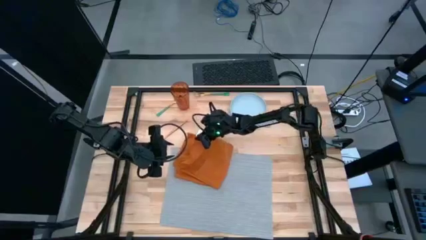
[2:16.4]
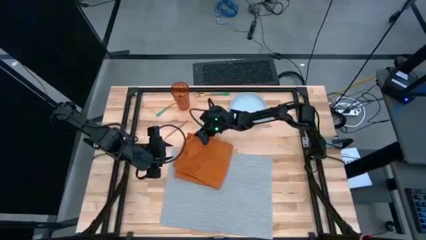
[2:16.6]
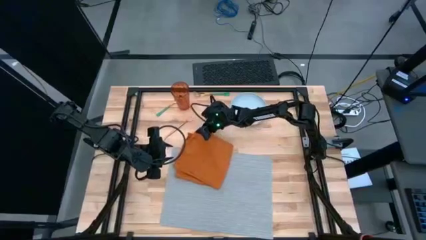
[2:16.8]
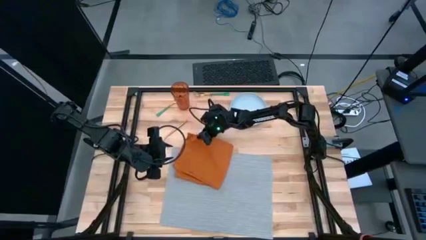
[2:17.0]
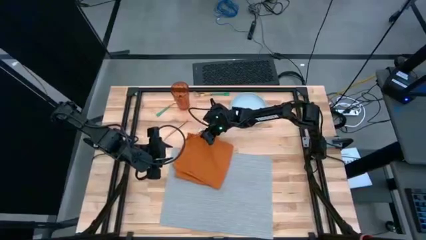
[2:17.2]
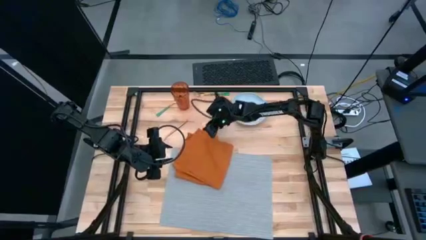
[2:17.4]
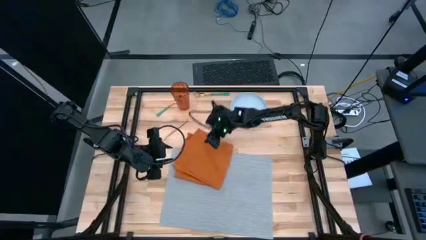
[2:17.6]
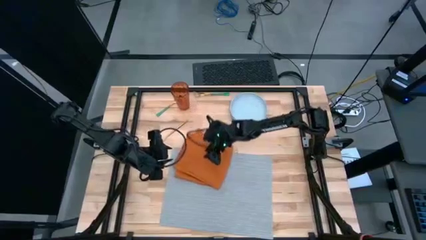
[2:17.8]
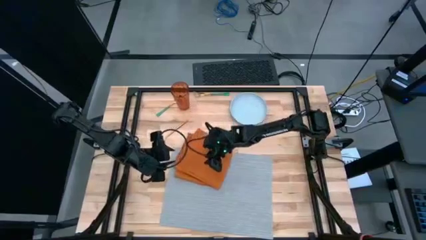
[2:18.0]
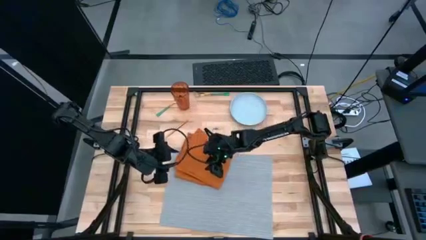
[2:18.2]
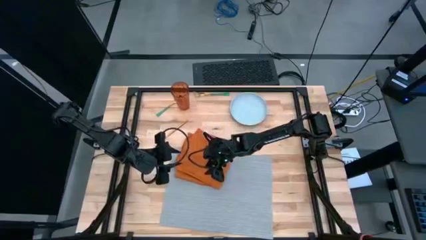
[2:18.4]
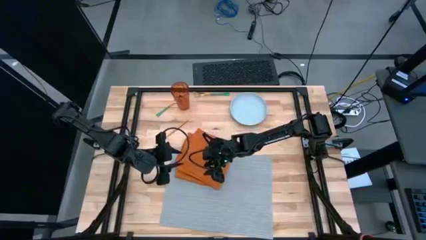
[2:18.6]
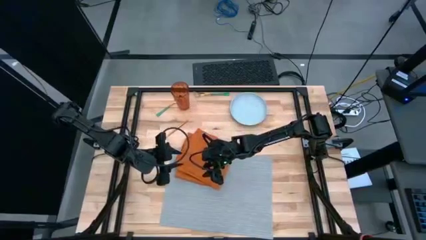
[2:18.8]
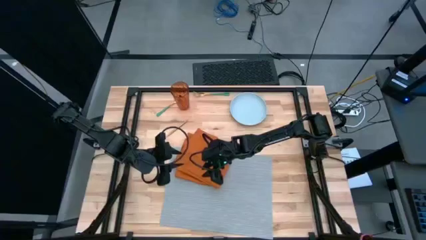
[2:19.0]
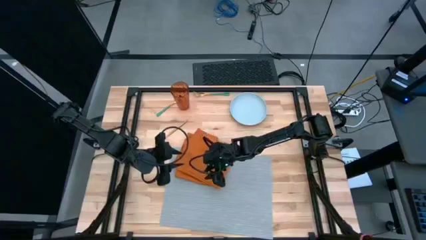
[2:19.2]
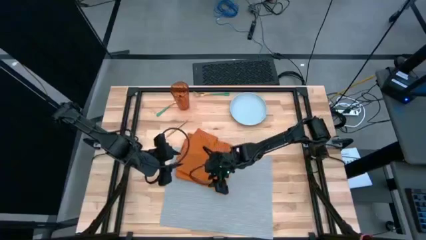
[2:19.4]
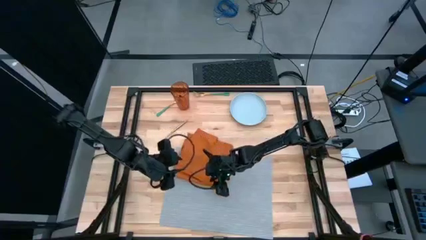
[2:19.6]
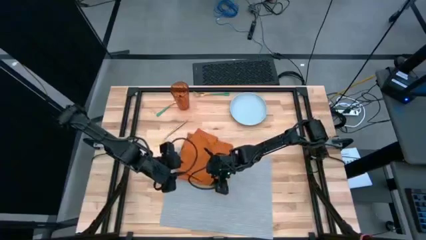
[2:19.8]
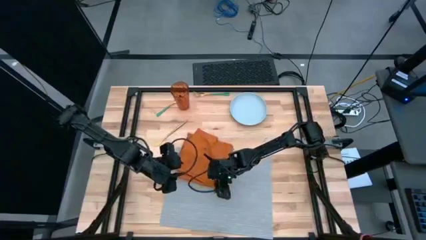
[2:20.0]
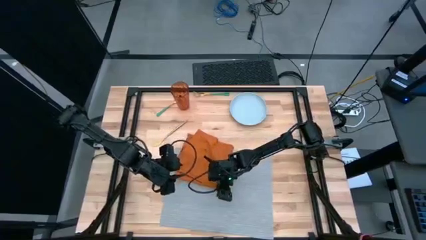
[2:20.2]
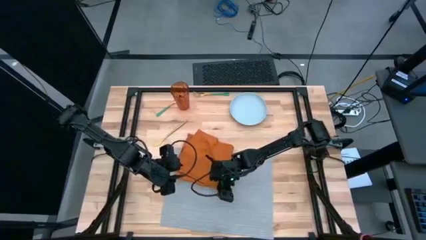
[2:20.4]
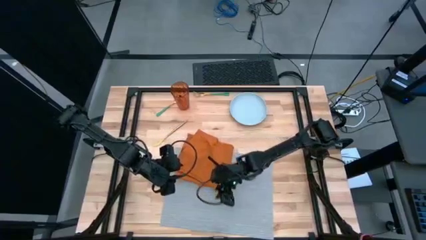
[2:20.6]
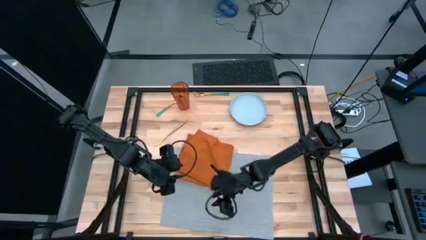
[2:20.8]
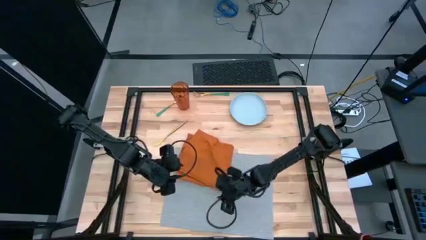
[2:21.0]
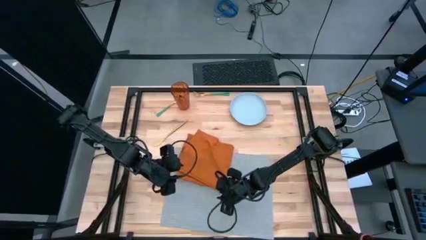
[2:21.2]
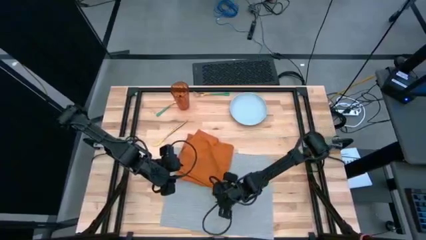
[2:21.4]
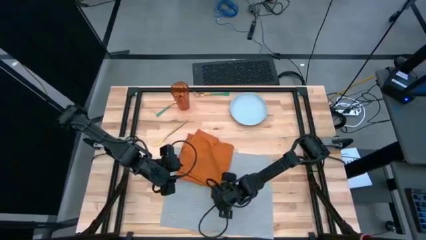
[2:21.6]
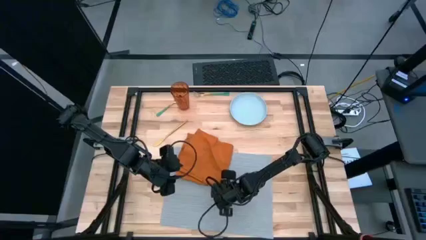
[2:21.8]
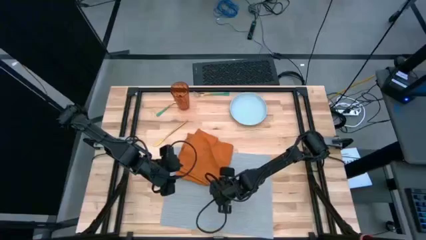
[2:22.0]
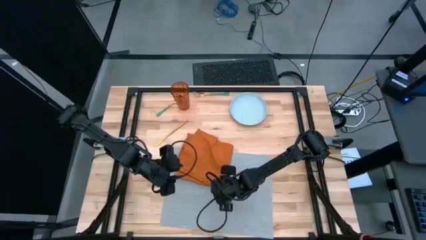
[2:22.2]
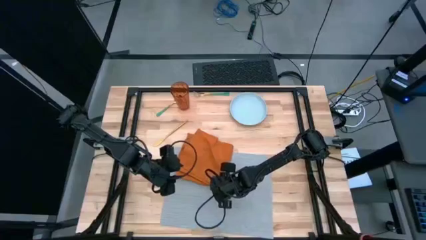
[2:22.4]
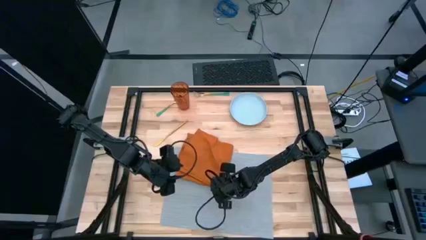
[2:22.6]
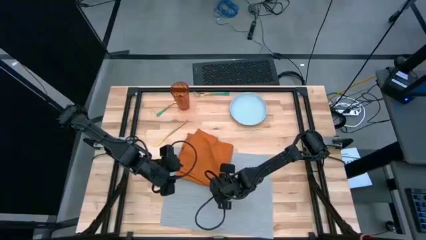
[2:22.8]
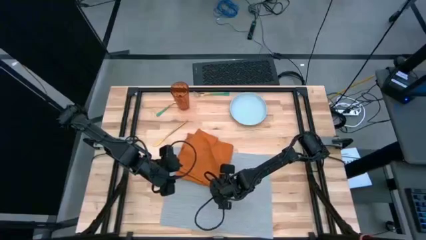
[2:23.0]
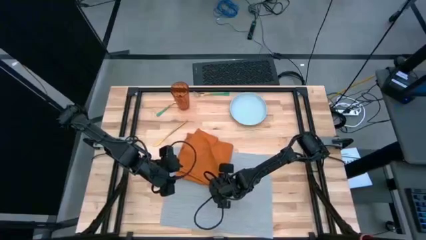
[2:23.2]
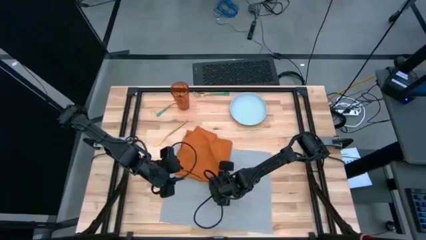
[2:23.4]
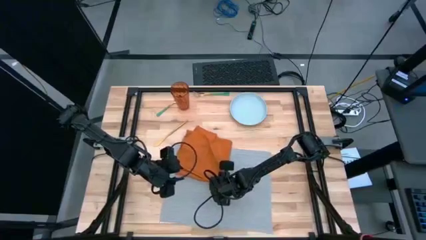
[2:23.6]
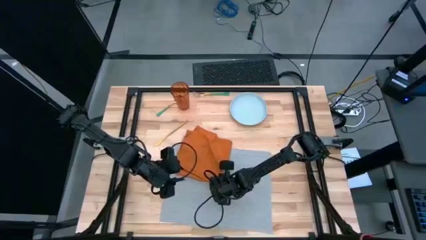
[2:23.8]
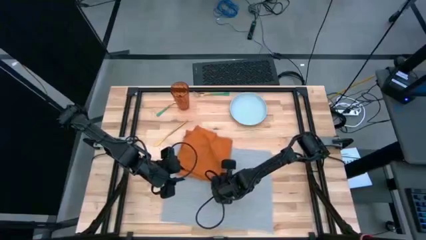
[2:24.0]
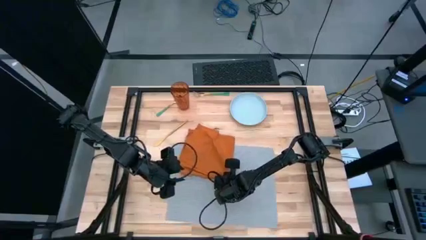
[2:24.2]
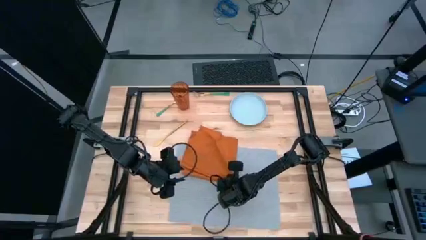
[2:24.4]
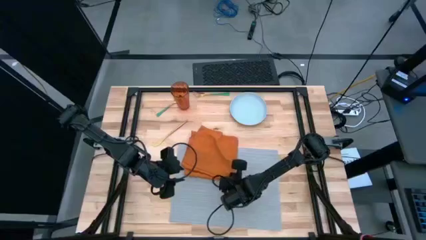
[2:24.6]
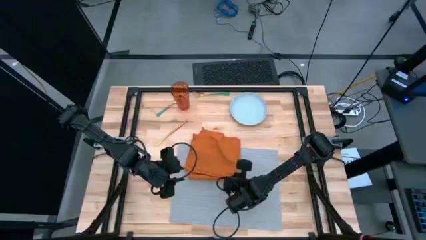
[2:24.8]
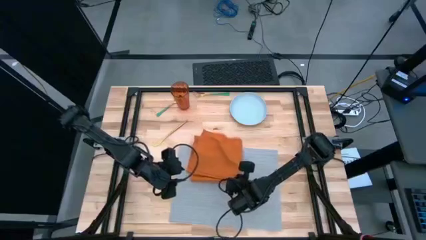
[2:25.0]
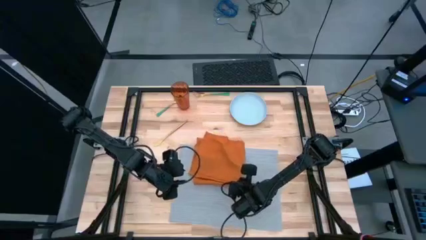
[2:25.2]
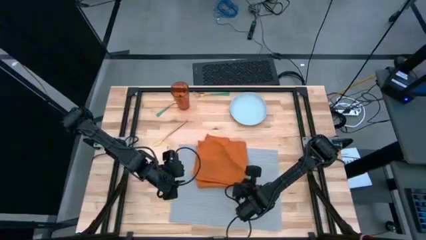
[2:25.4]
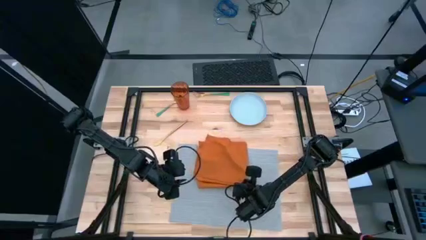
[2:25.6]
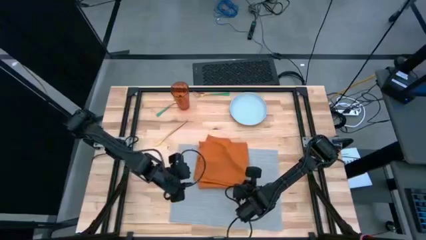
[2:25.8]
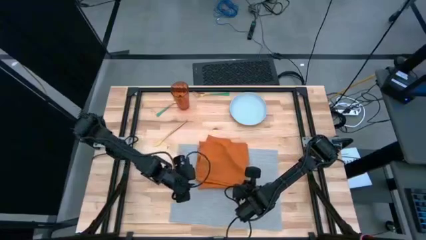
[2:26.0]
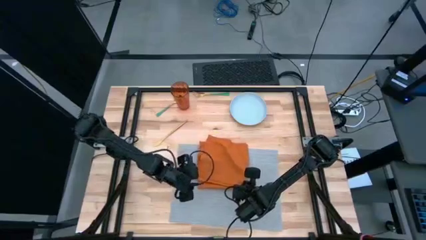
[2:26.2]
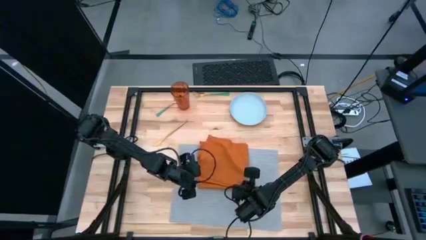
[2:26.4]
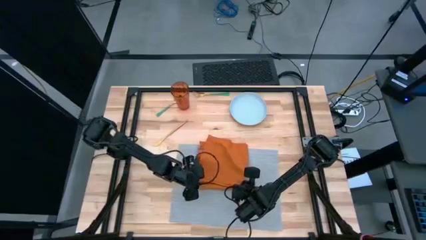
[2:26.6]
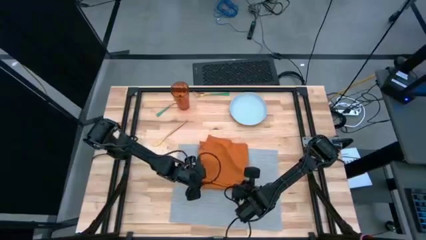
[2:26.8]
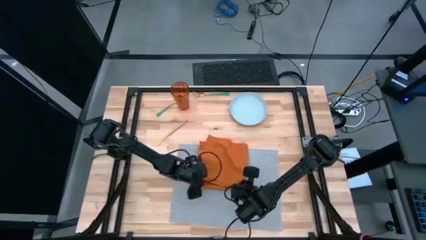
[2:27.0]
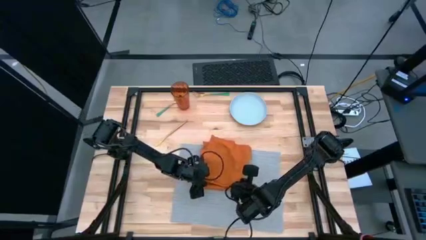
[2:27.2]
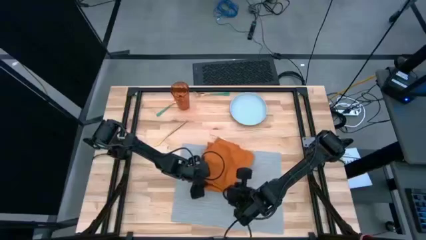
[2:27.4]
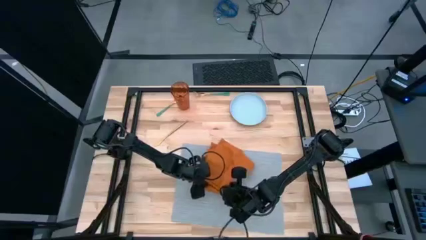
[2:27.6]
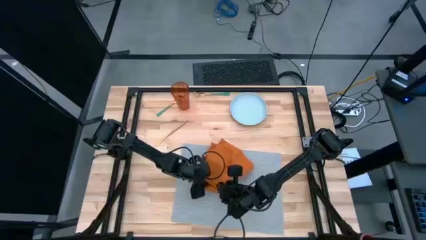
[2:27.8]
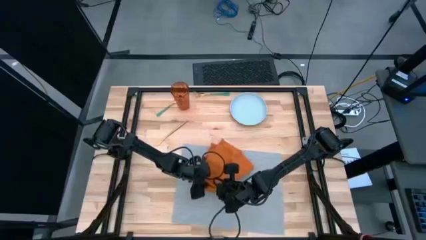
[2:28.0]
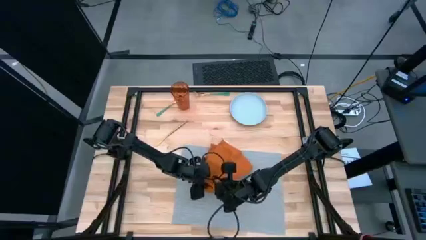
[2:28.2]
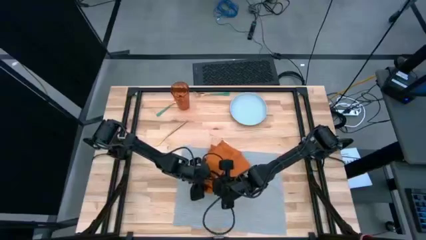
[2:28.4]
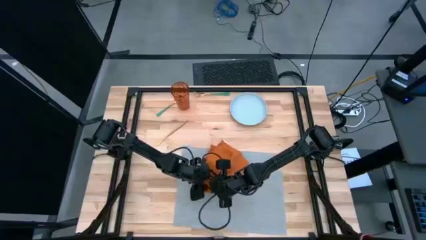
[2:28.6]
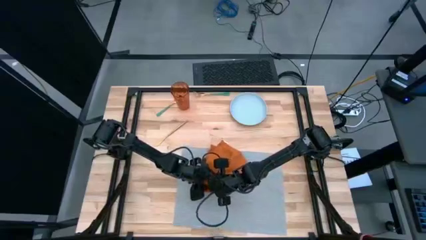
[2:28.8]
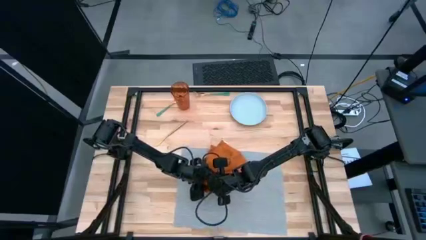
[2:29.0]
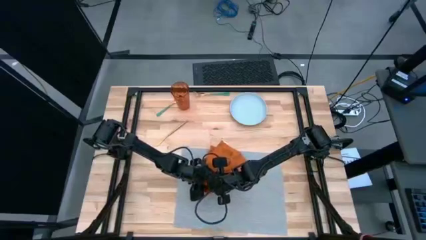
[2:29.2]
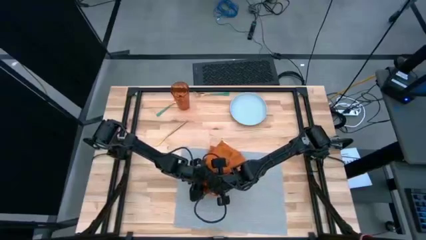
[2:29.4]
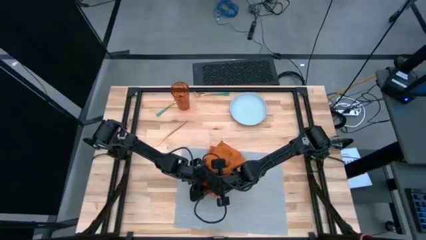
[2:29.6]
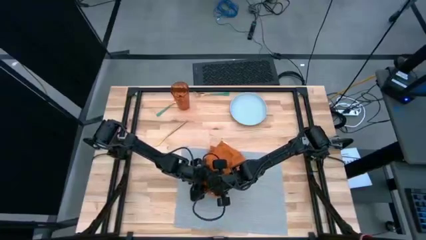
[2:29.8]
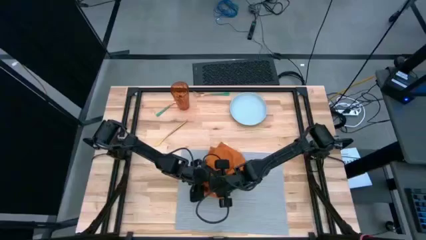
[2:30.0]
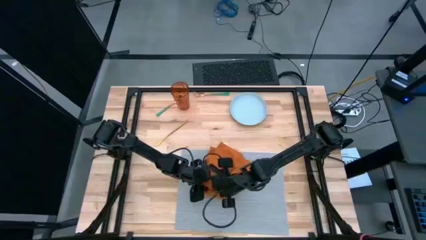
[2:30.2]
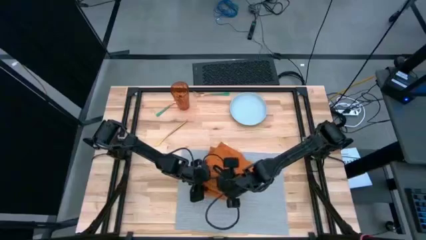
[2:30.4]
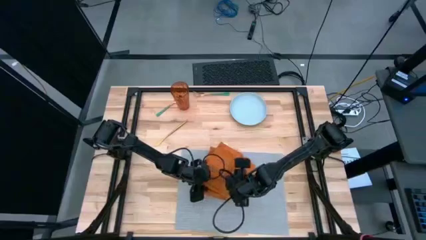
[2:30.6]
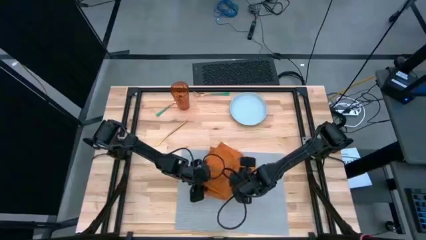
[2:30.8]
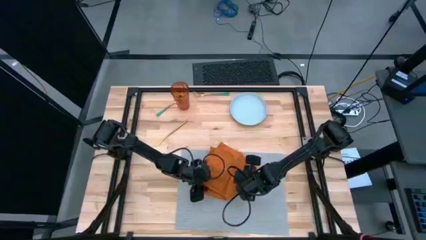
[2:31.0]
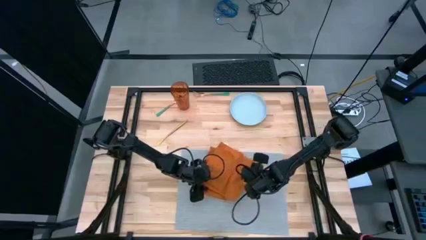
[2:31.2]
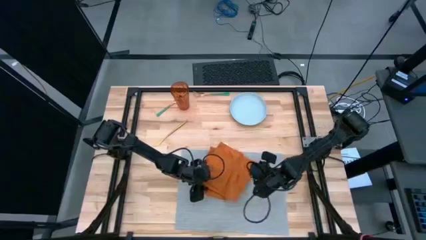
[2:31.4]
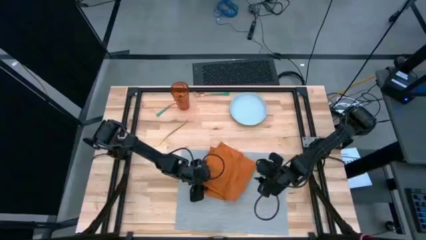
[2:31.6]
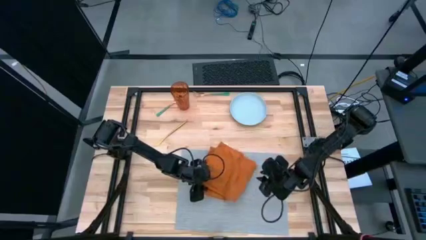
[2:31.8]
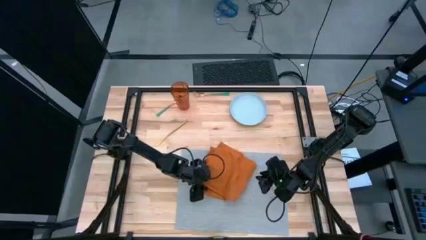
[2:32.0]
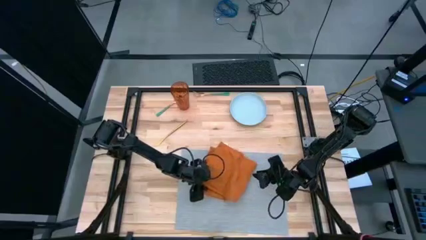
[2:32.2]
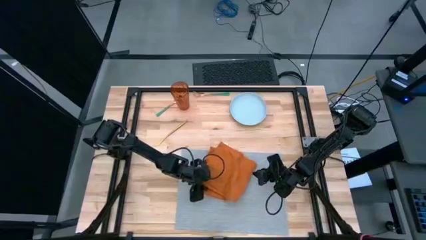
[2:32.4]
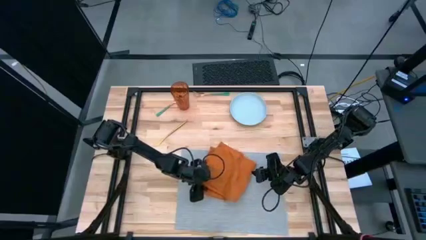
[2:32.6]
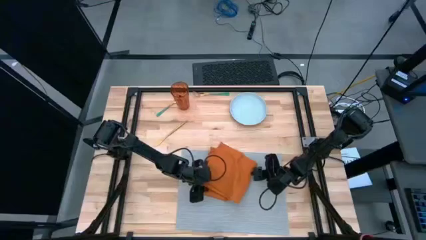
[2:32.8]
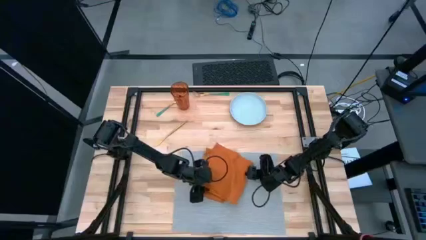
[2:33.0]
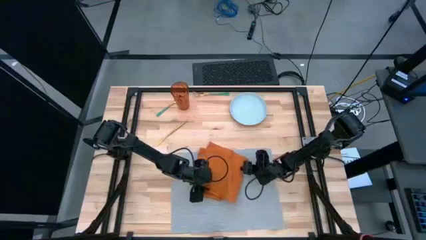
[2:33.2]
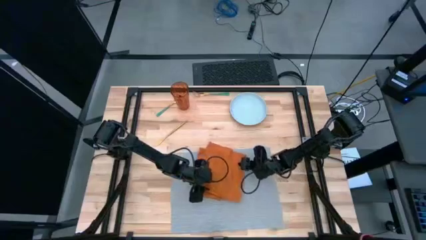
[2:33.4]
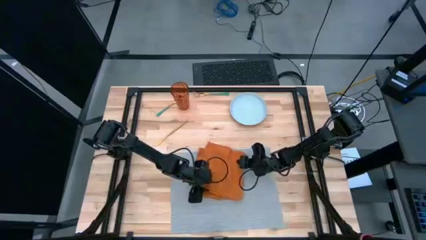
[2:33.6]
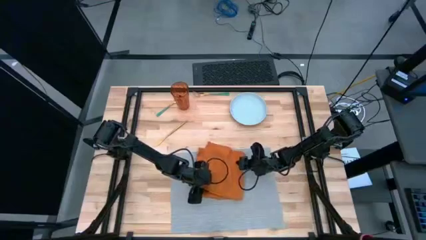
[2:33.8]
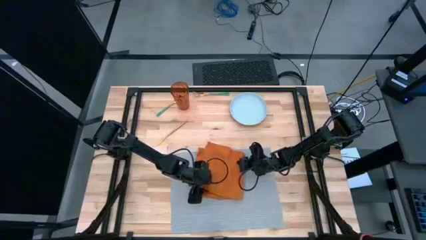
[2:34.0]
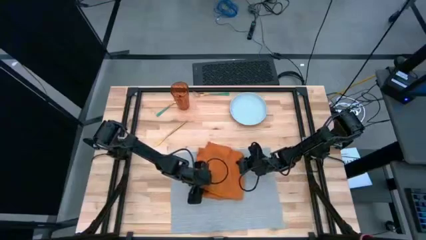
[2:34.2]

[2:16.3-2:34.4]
Task: Set table place
Fold the orange table napkin
